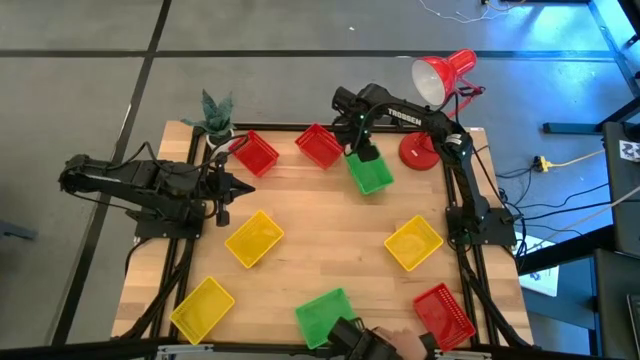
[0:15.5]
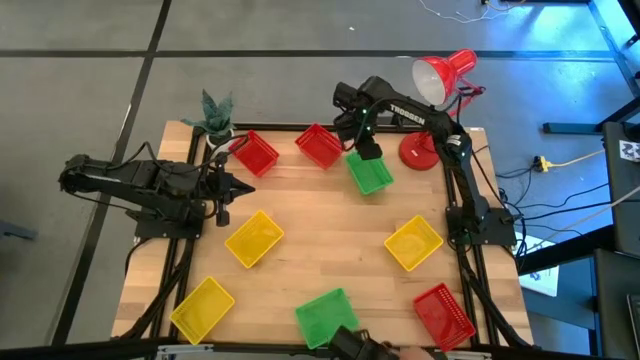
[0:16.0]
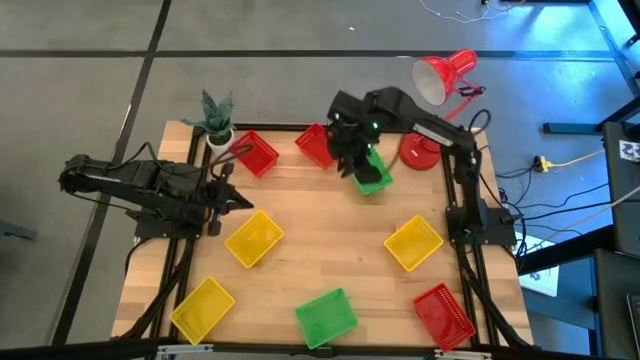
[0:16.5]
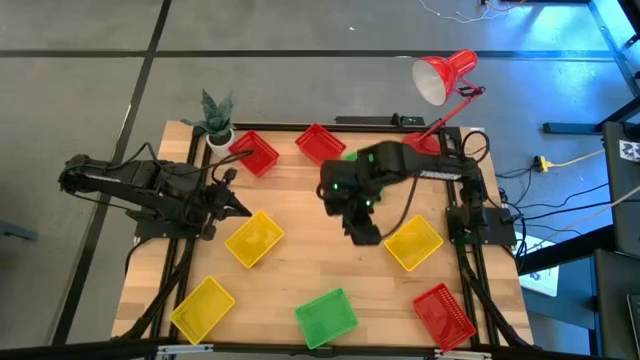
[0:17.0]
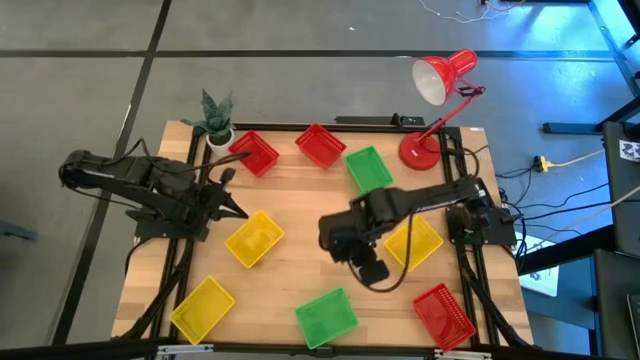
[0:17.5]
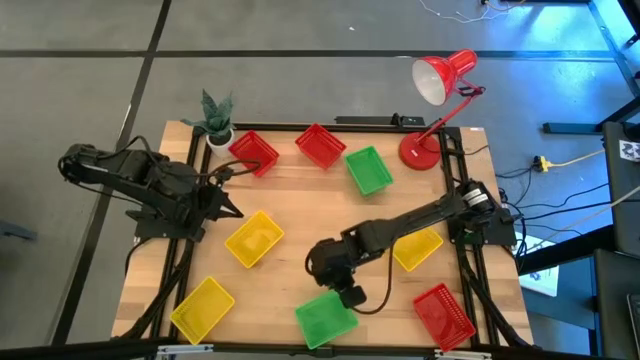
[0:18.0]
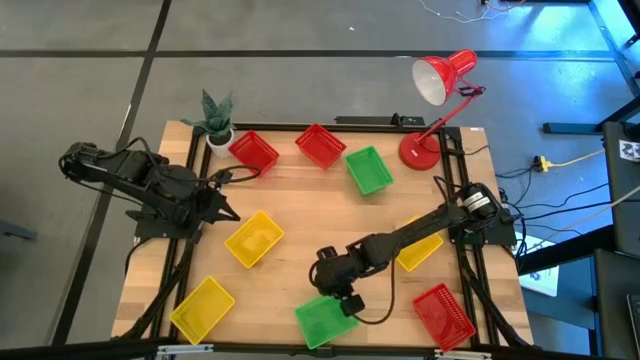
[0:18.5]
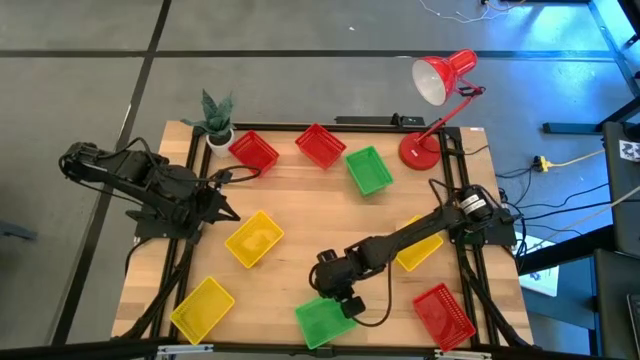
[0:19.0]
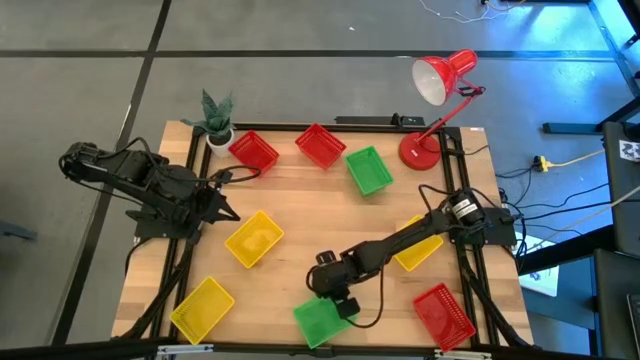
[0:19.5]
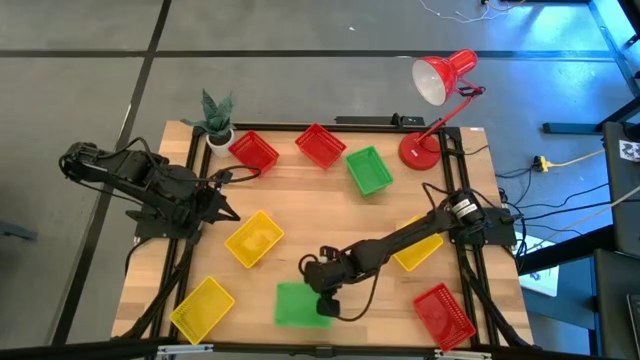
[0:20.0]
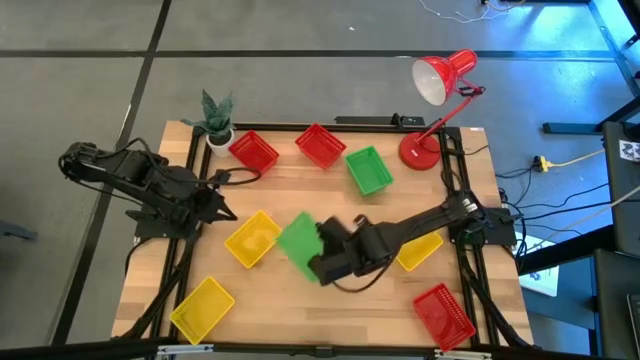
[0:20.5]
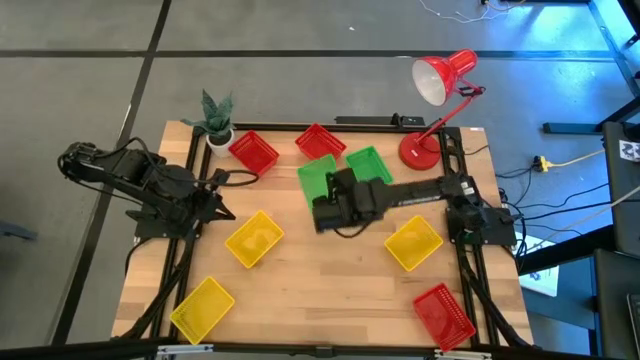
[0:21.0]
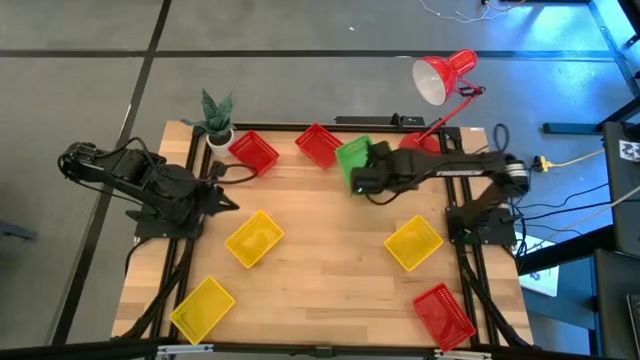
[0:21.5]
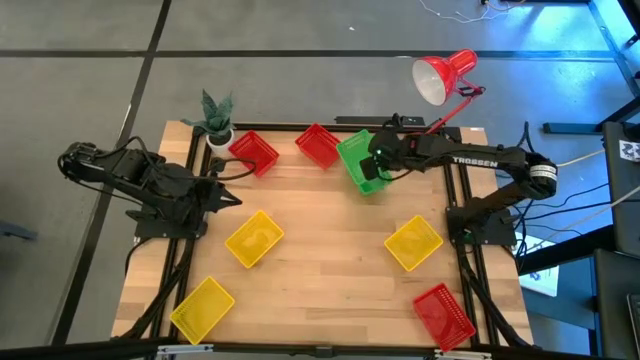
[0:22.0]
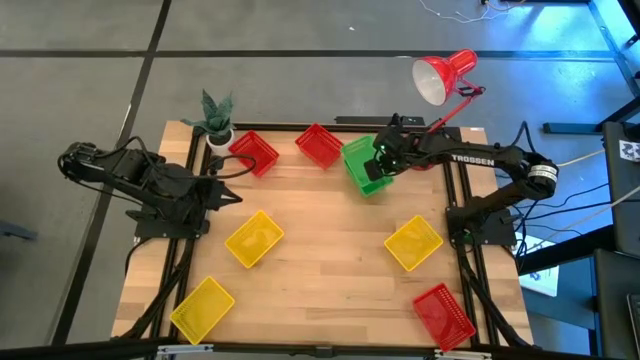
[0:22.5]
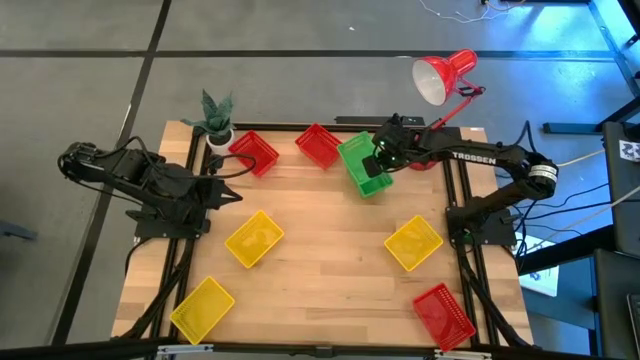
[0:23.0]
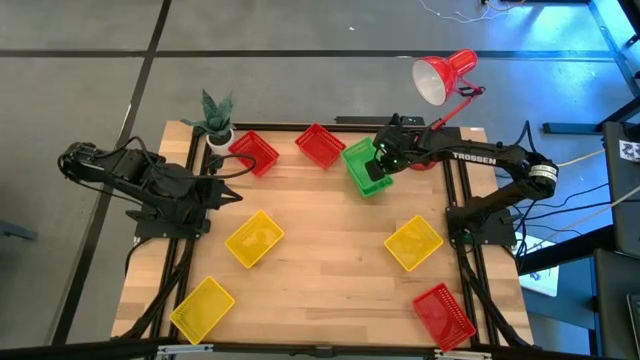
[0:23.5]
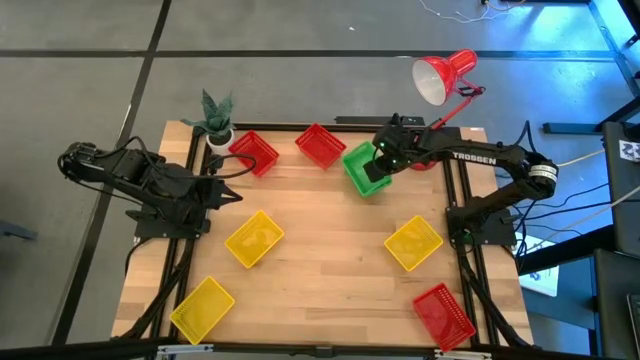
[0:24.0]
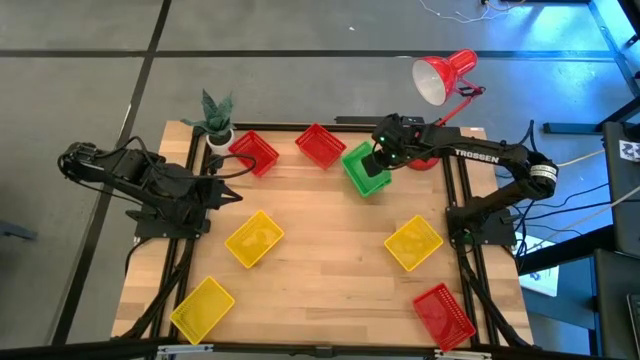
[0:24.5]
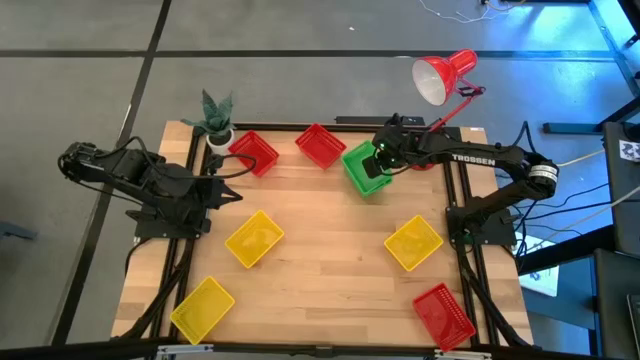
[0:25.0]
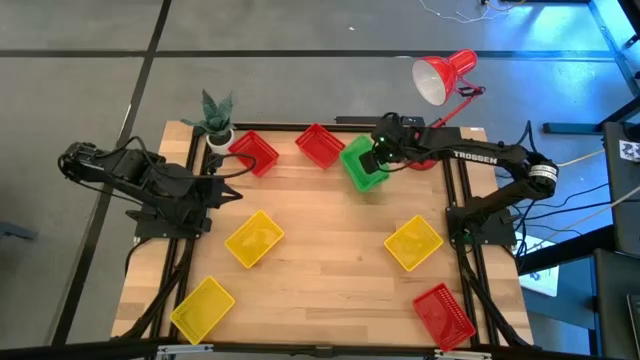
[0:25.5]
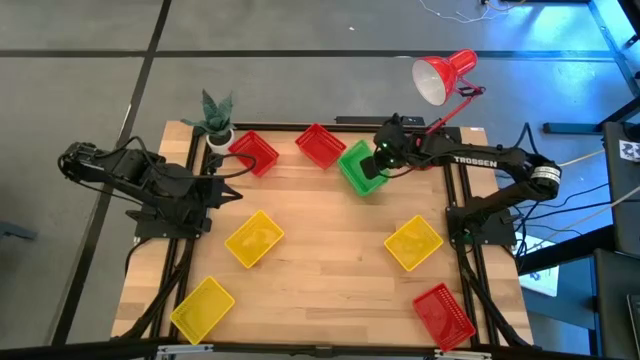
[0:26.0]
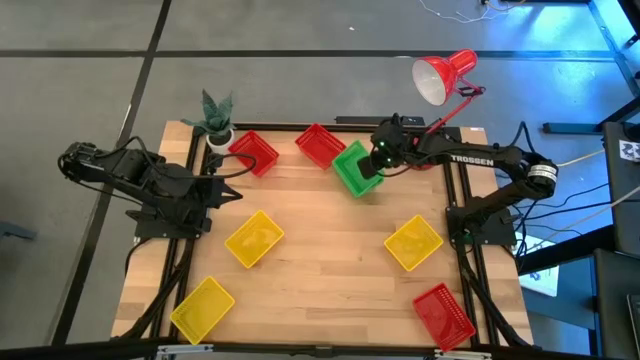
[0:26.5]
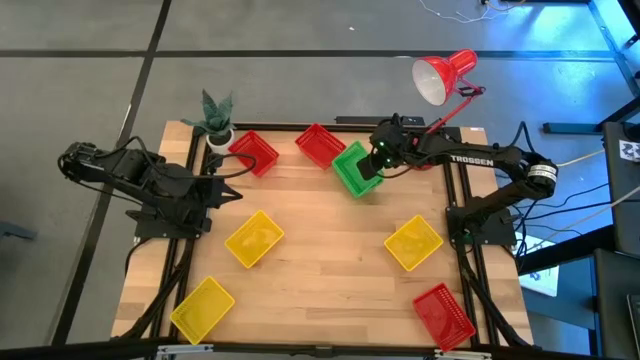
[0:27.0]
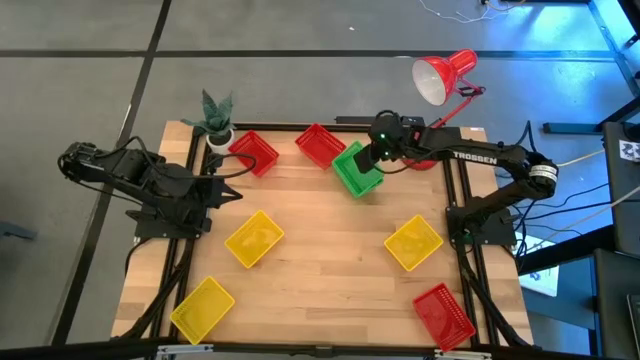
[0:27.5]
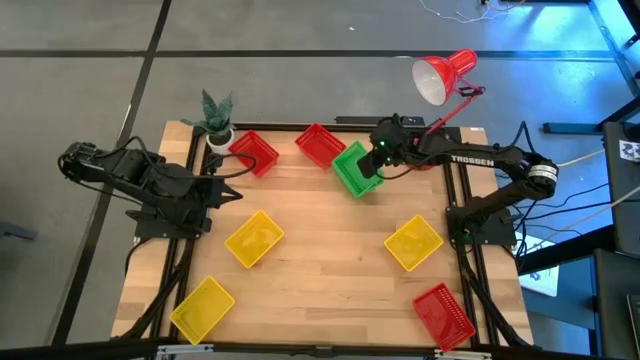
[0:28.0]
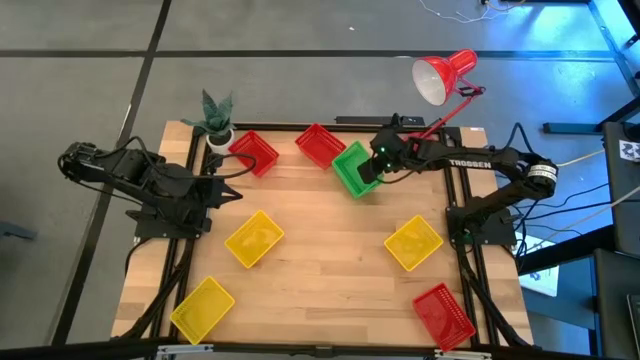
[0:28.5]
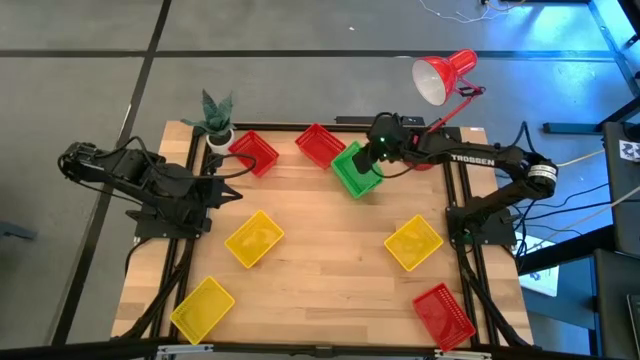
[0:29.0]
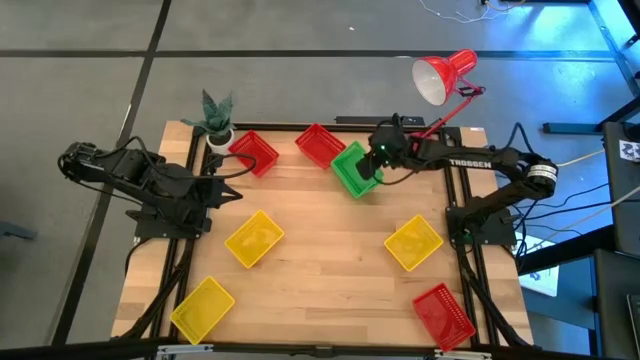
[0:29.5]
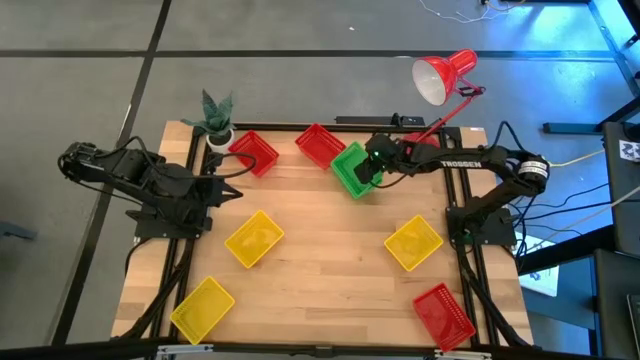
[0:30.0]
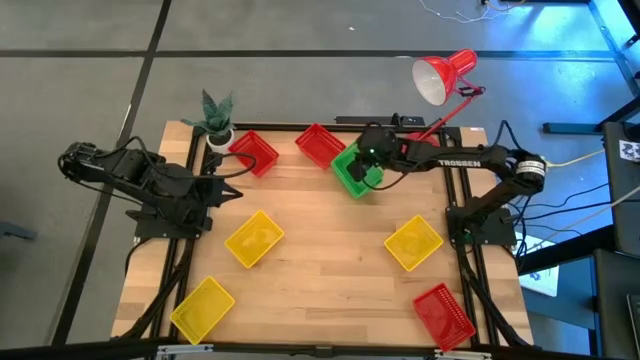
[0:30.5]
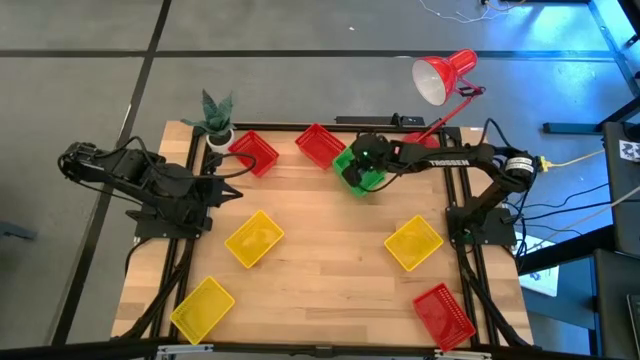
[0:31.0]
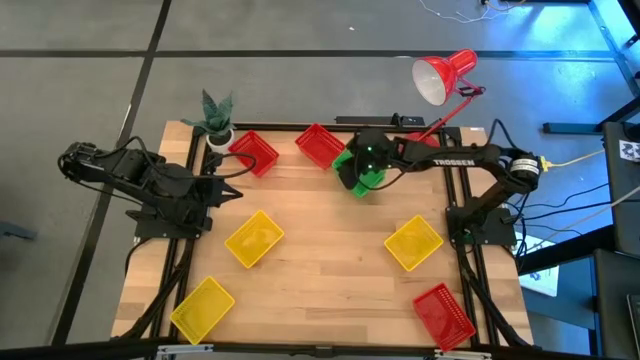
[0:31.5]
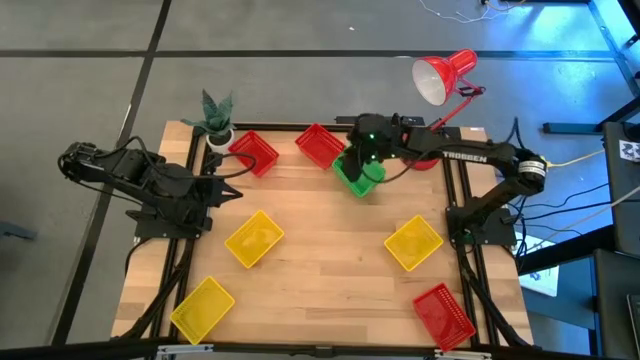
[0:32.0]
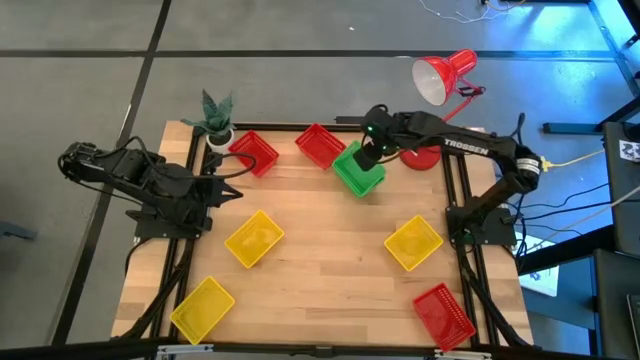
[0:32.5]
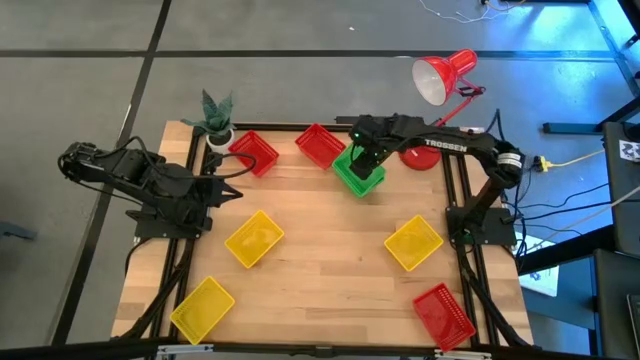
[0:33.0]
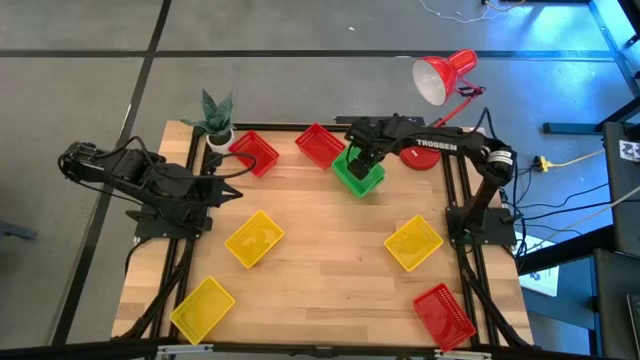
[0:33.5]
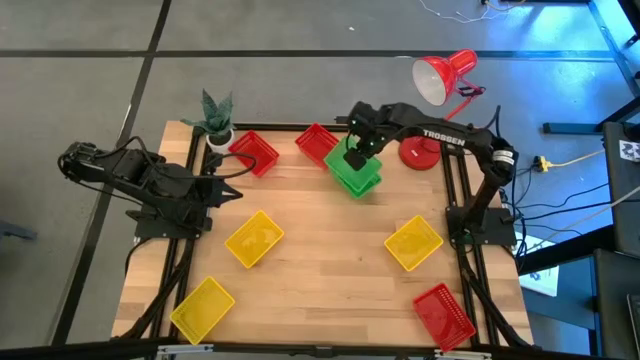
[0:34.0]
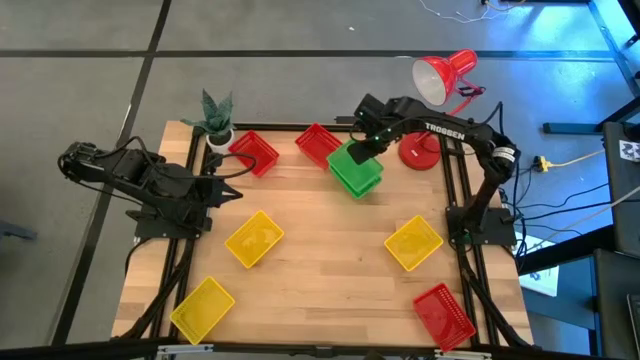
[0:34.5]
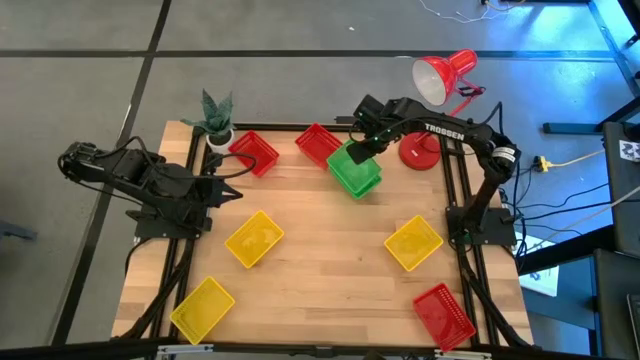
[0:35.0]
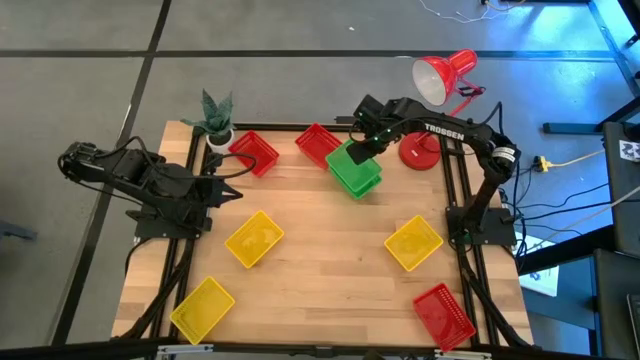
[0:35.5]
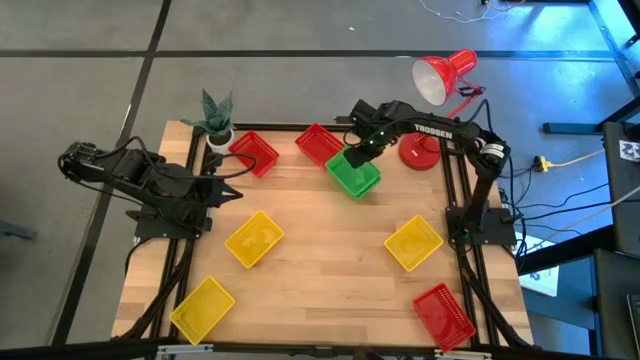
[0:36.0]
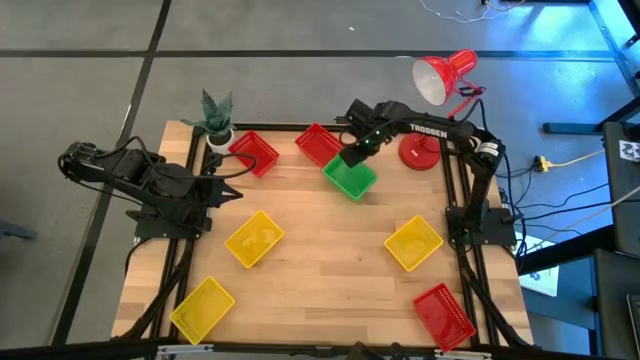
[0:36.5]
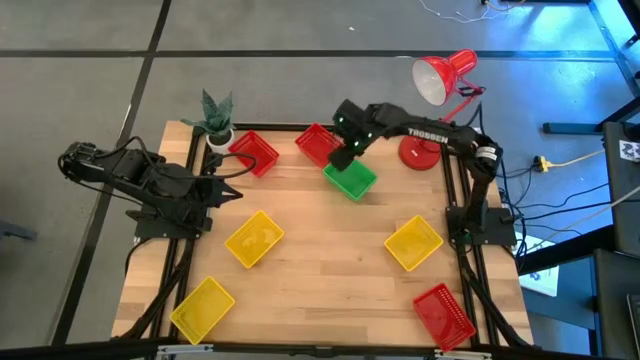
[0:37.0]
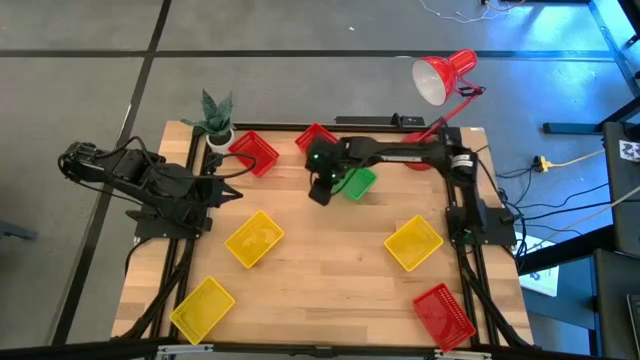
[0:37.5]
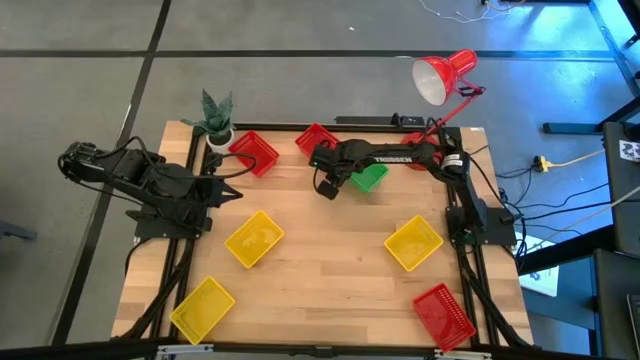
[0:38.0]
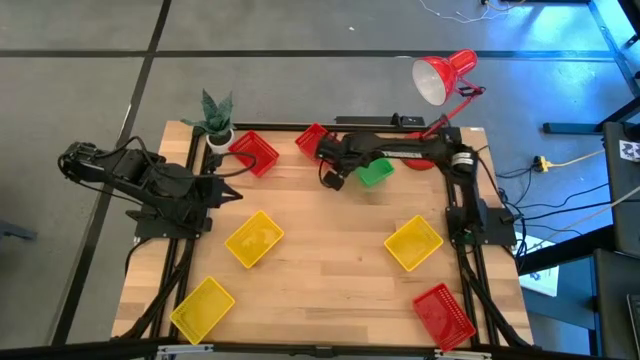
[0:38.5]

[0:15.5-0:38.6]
Stack the bottom green bin on the top green bin
